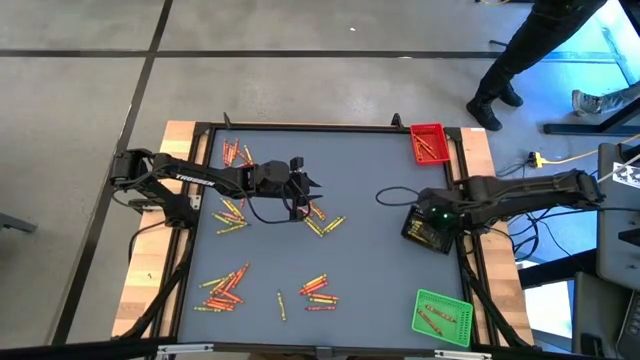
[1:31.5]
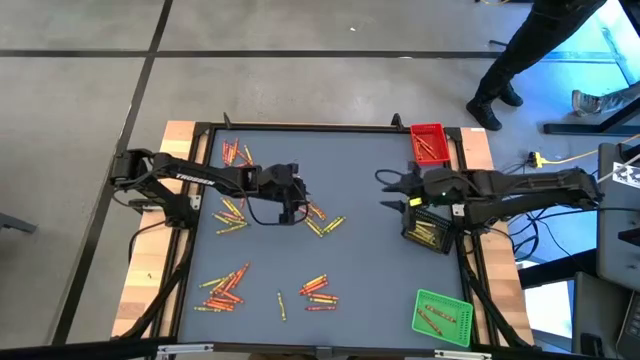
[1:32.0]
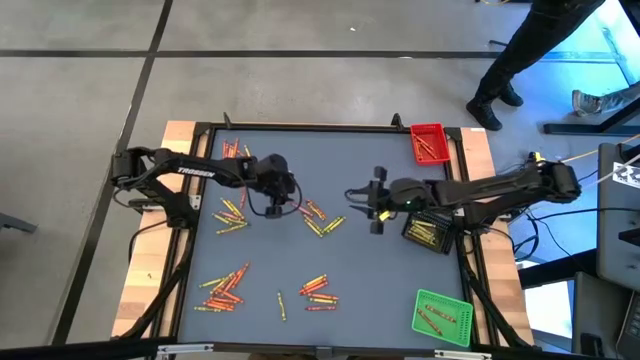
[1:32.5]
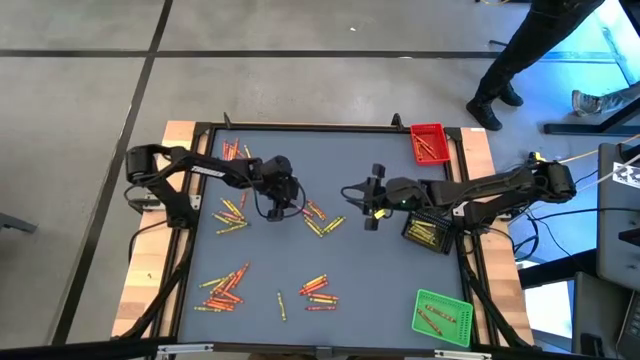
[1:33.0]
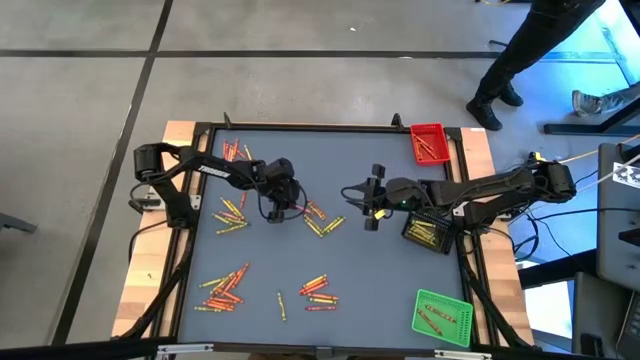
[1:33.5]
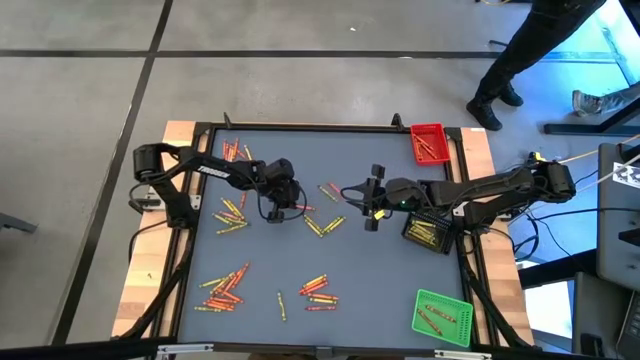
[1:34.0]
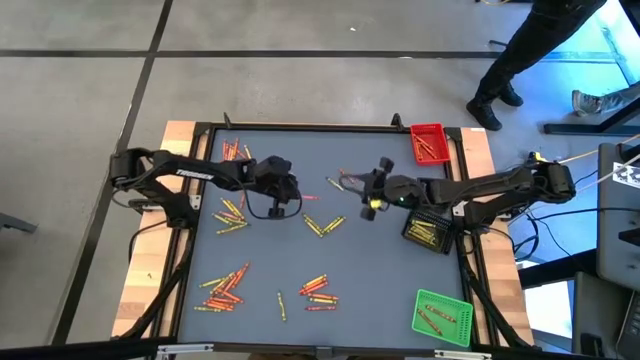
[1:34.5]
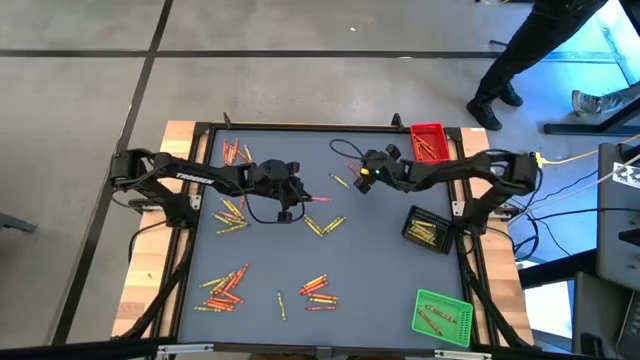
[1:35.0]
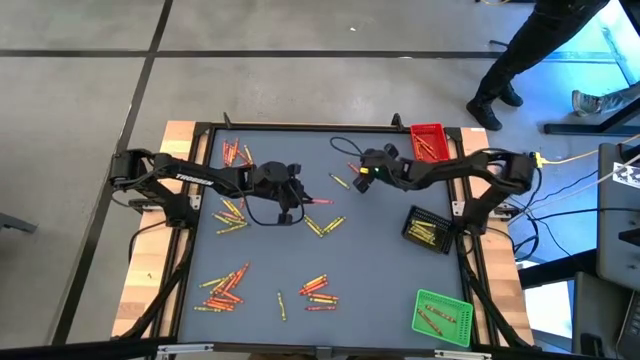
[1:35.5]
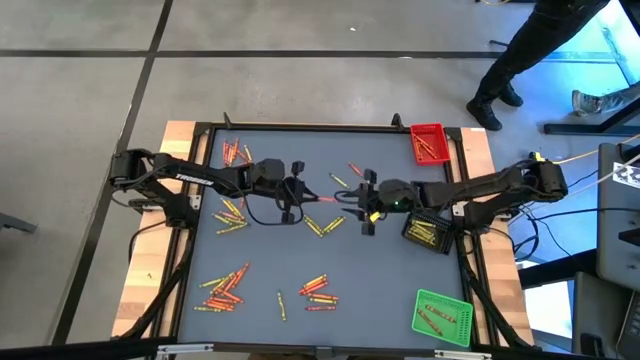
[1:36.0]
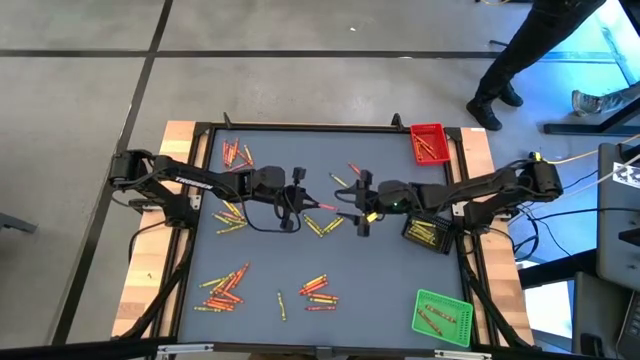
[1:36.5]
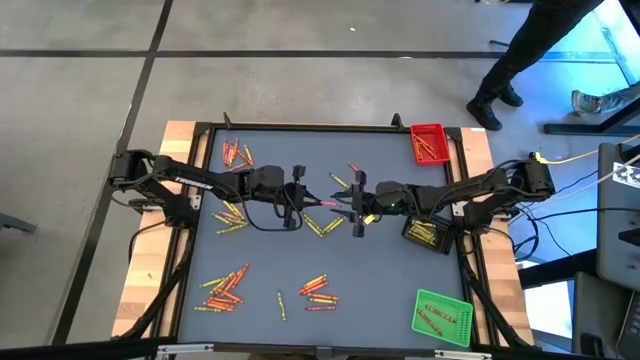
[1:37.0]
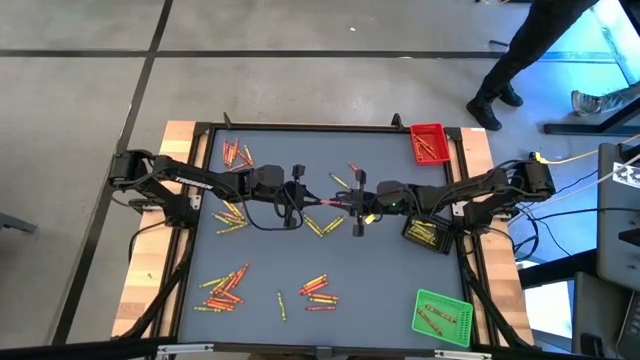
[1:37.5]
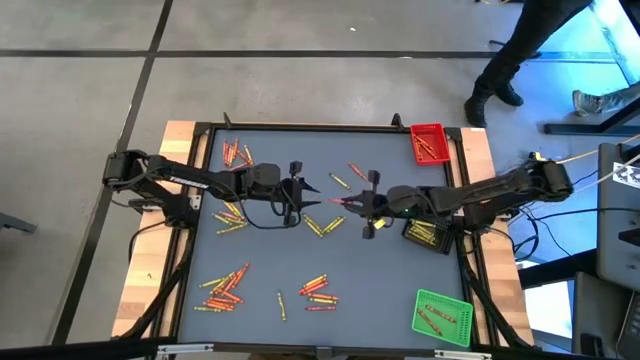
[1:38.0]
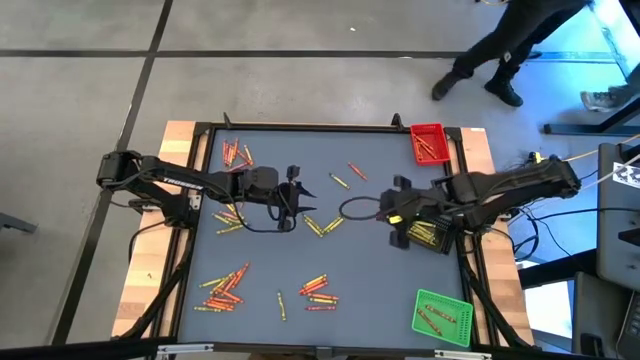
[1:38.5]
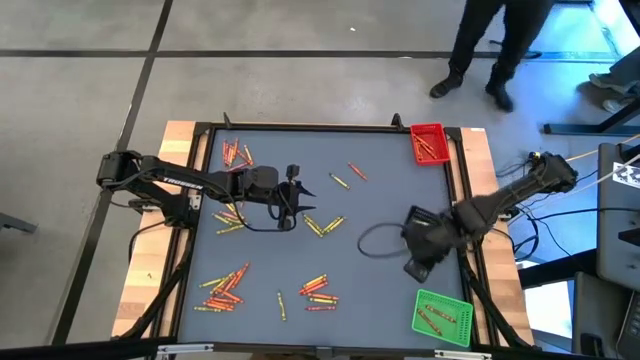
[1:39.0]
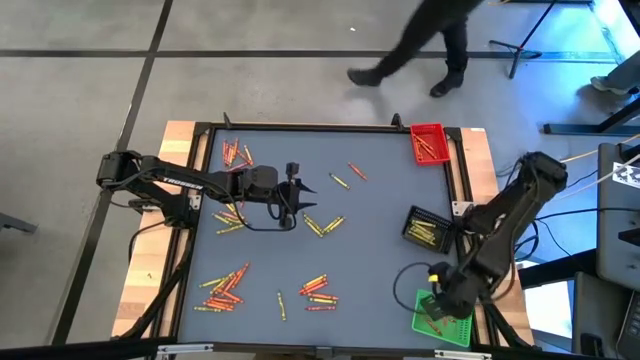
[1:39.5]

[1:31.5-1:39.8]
Task: Sort crayons
Put the red crayon into the green basket

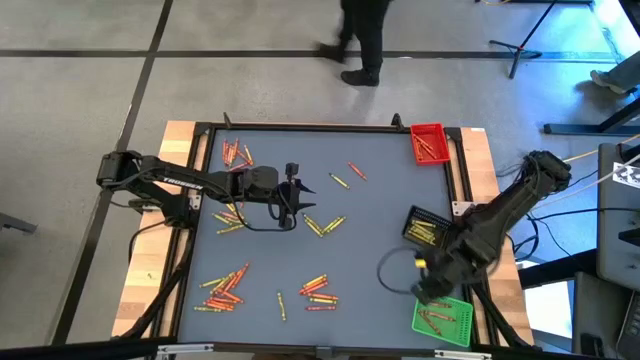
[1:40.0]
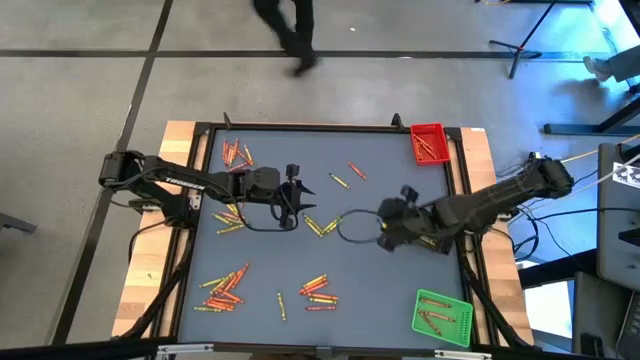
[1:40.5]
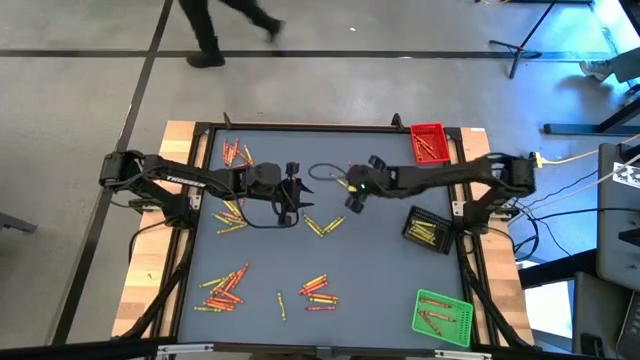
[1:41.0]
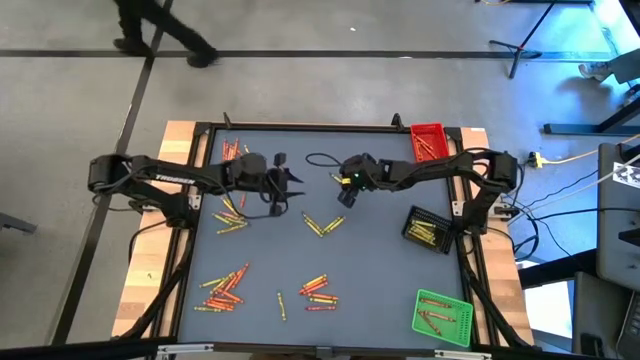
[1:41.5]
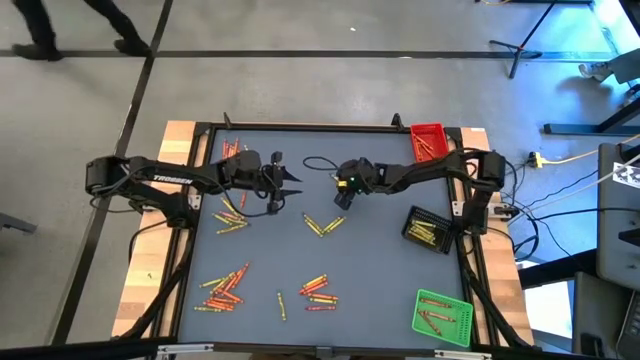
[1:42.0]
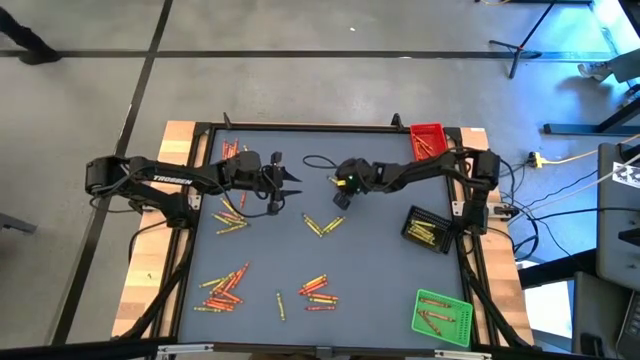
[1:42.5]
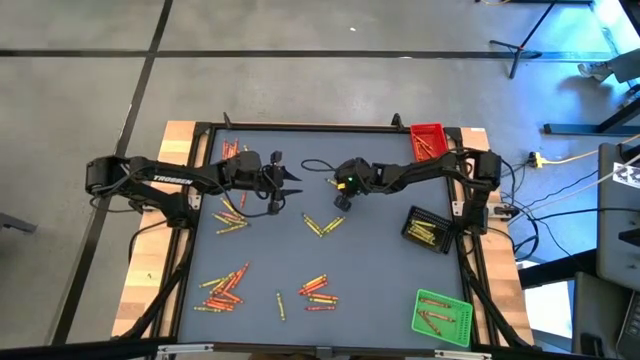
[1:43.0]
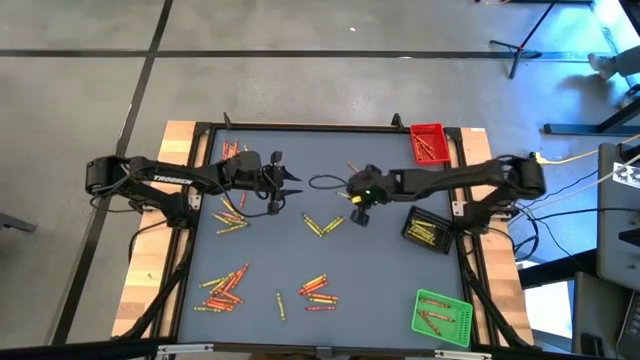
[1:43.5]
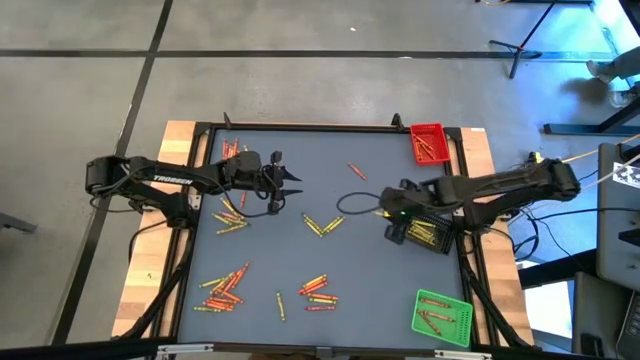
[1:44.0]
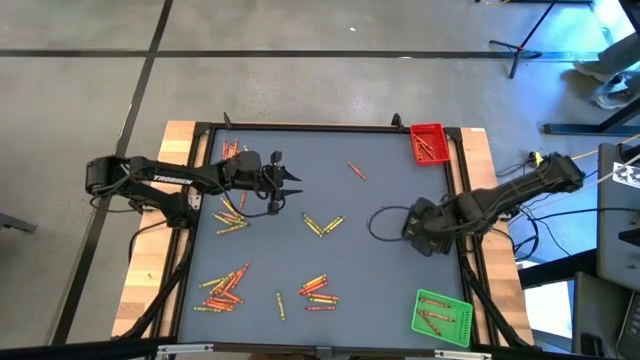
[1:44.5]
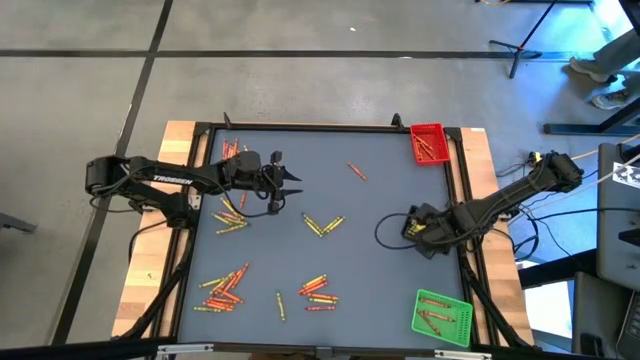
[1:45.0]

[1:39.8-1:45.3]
Put the green crayon into the black basket

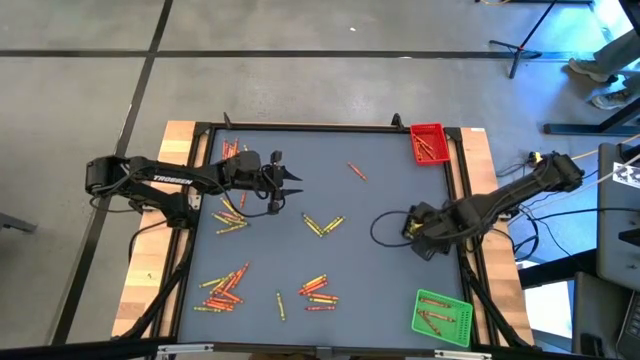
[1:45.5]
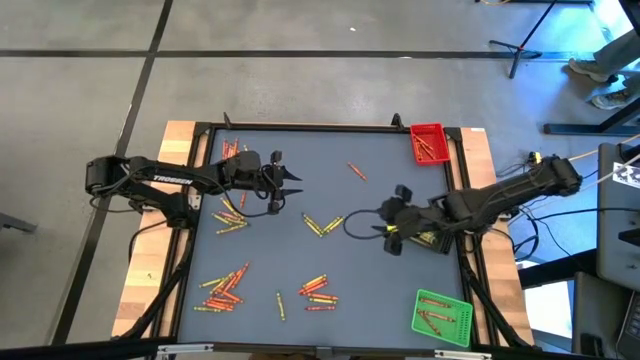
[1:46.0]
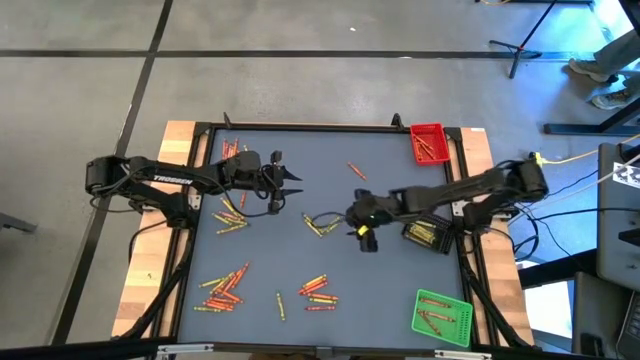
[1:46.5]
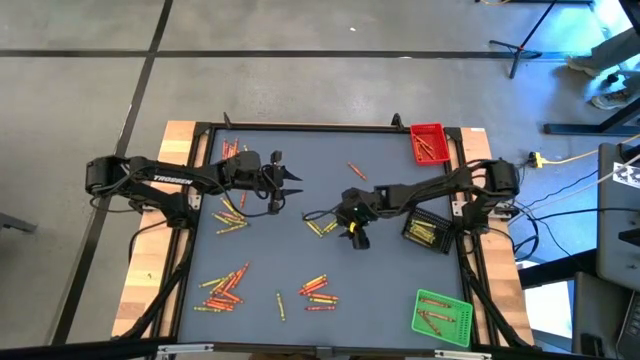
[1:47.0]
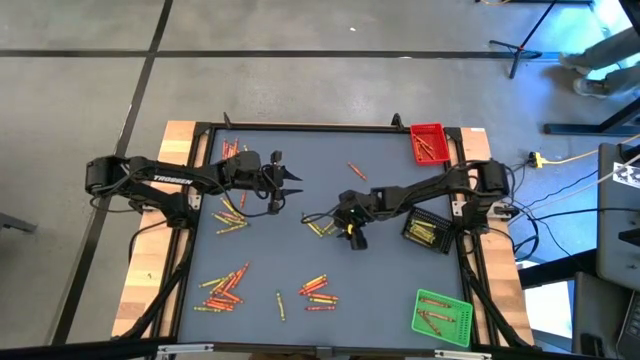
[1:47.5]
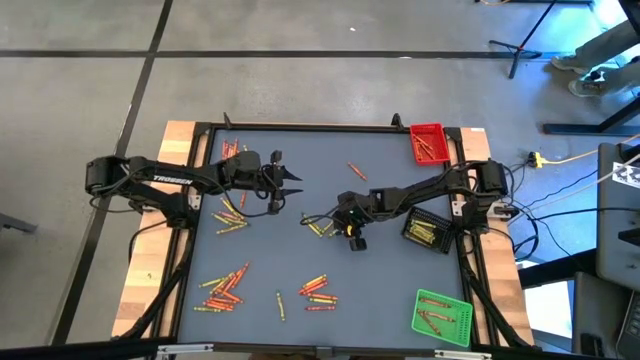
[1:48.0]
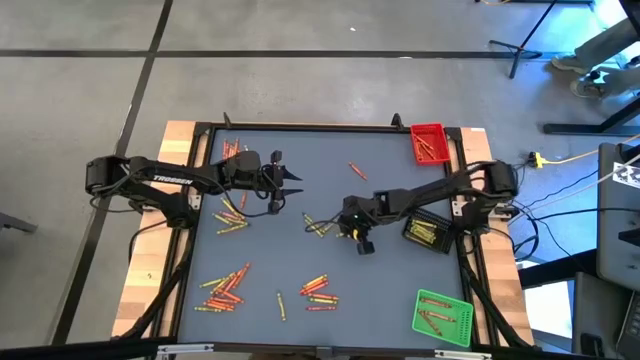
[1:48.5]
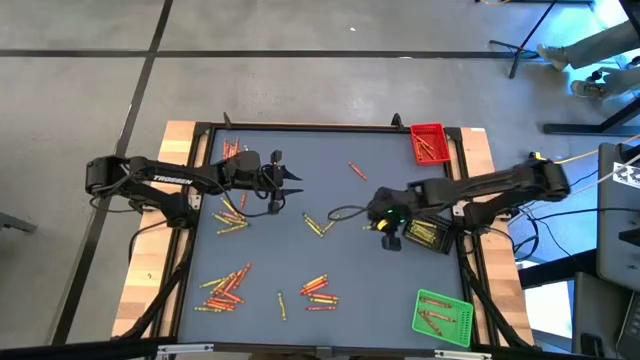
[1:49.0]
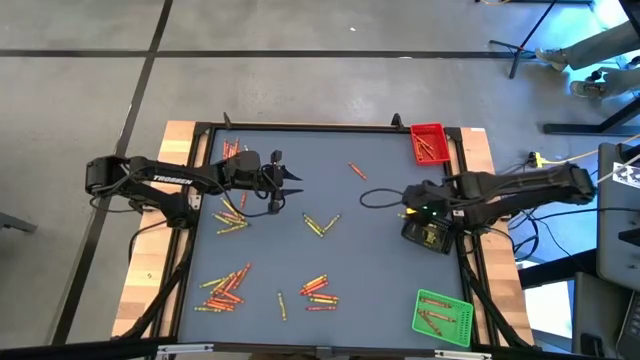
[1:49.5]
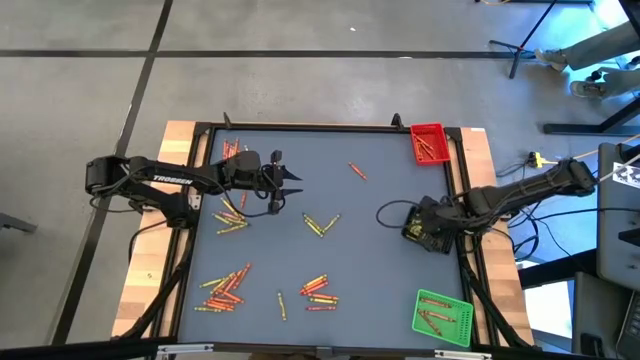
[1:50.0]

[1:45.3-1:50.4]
Put the green crayon into the black basket

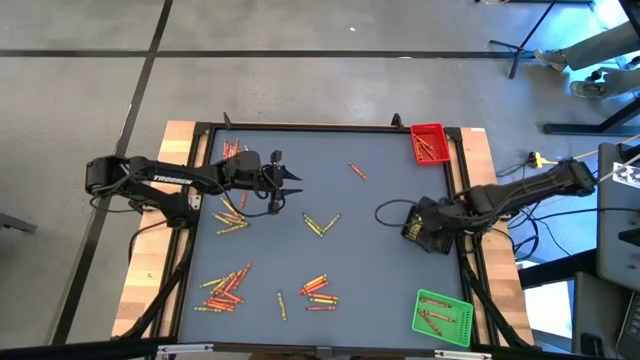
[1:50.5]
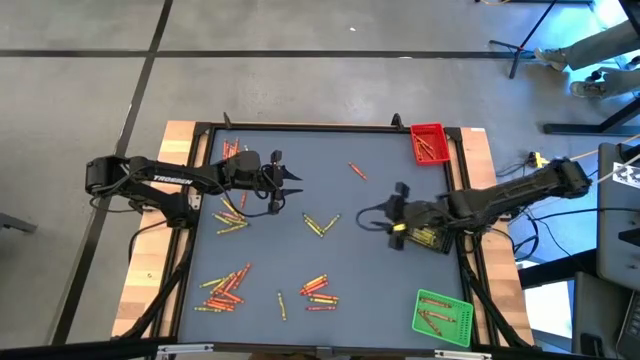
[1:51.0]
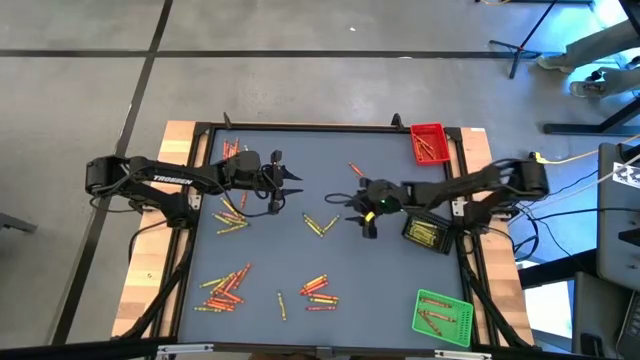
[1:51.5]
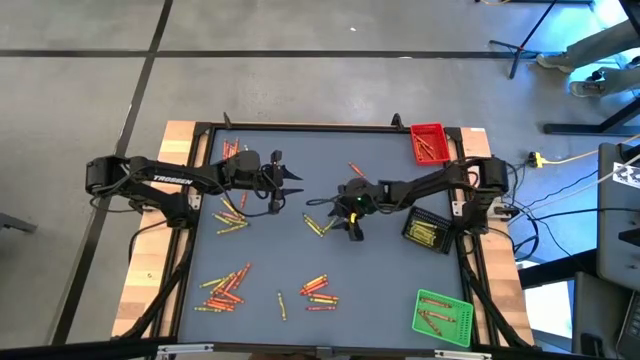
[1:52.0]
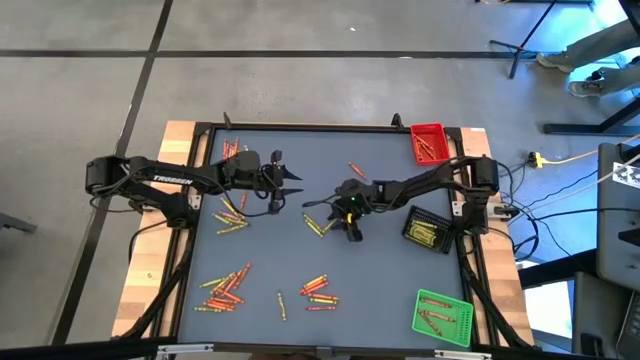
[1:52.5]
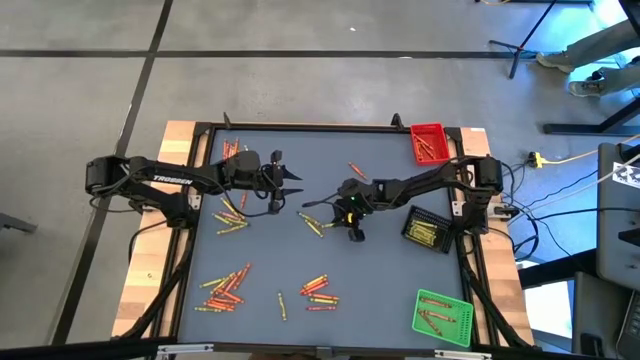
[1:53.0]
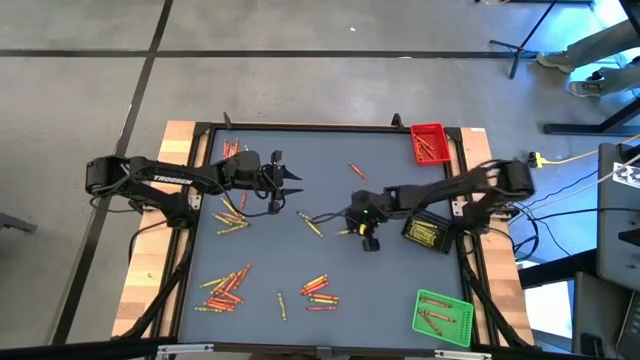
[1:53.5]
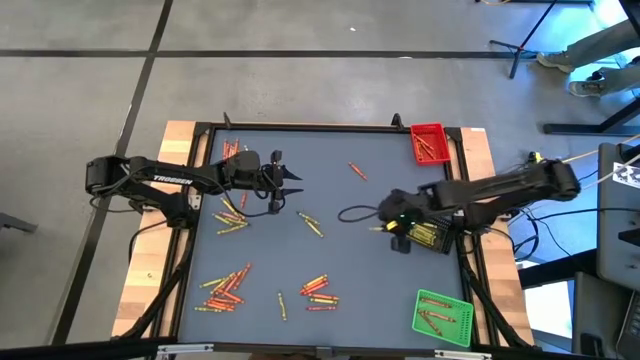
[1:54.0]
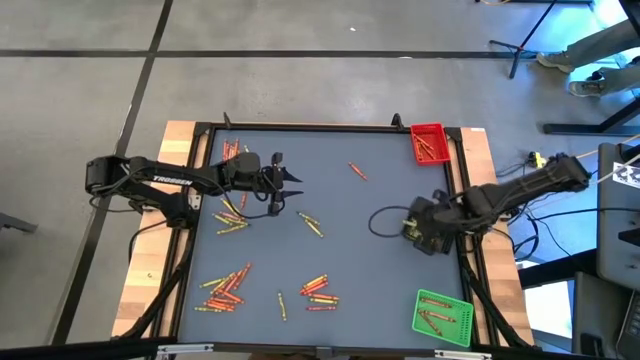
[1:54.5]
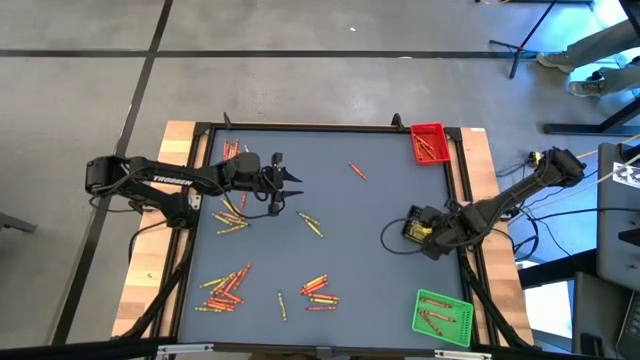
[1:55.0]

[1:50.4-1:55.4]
Put the green crayon into the black basket
